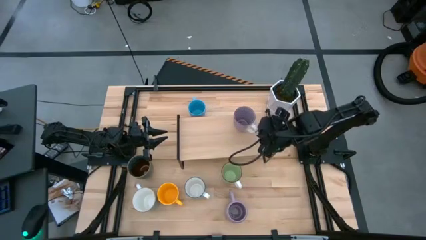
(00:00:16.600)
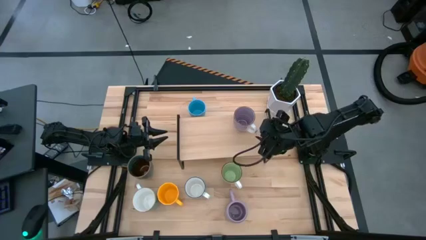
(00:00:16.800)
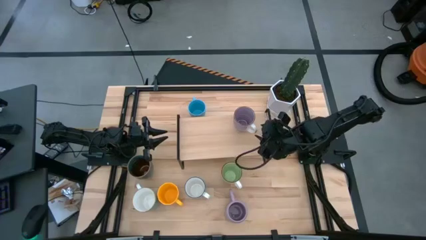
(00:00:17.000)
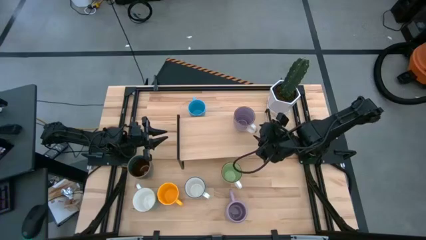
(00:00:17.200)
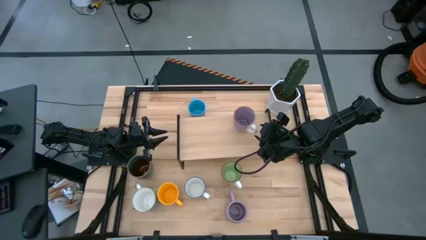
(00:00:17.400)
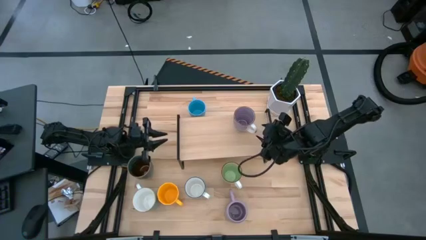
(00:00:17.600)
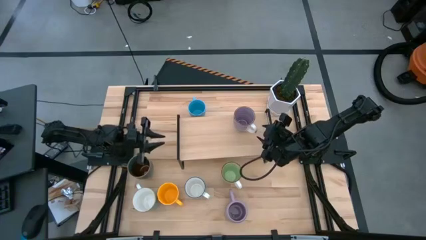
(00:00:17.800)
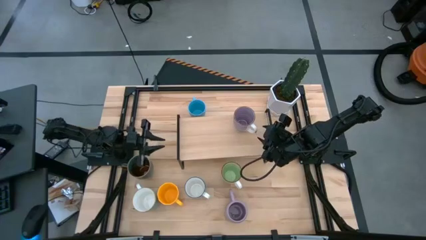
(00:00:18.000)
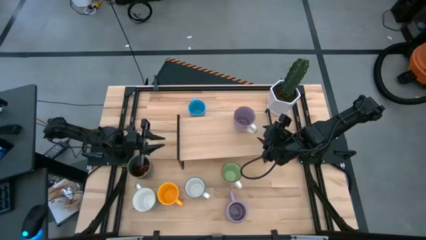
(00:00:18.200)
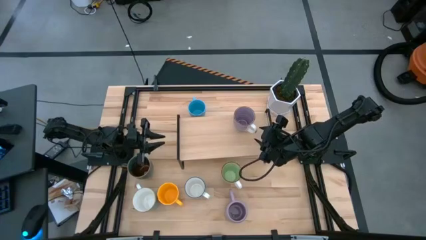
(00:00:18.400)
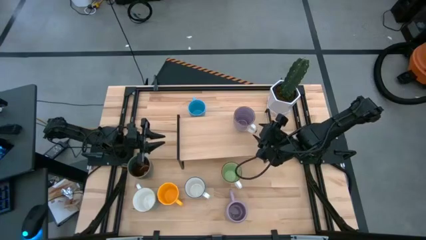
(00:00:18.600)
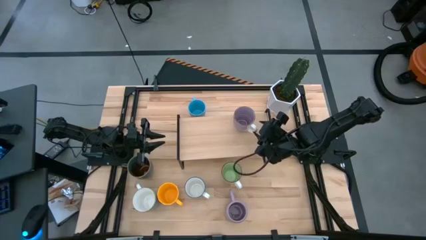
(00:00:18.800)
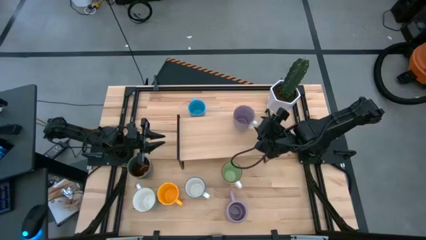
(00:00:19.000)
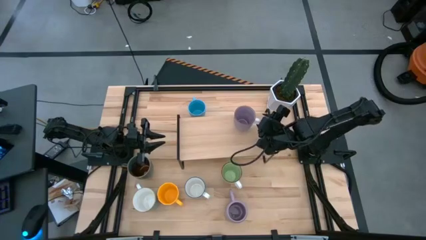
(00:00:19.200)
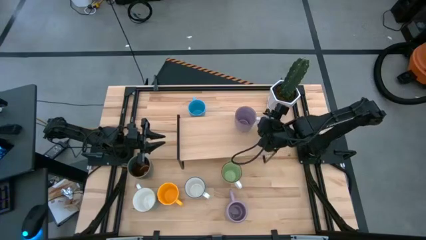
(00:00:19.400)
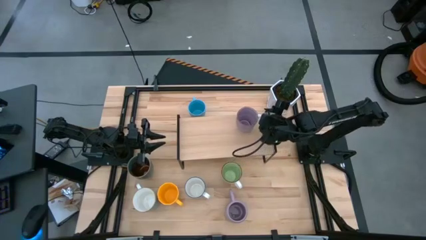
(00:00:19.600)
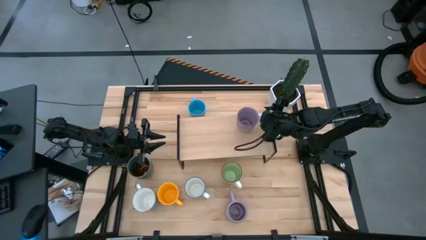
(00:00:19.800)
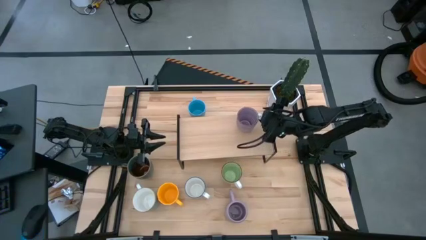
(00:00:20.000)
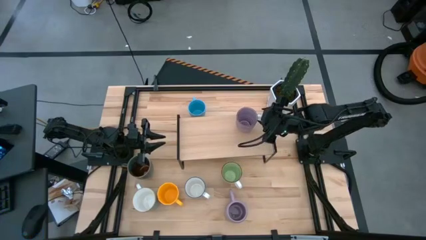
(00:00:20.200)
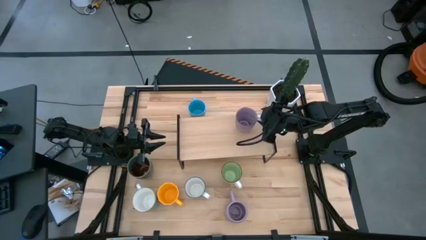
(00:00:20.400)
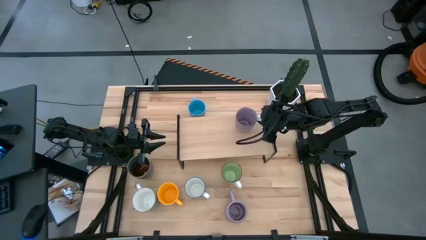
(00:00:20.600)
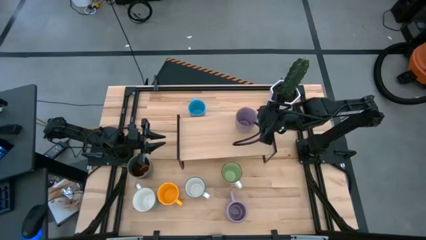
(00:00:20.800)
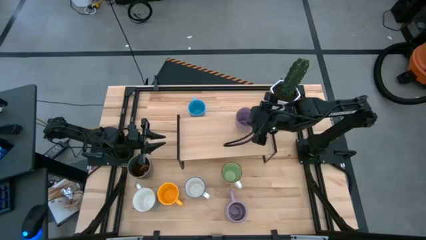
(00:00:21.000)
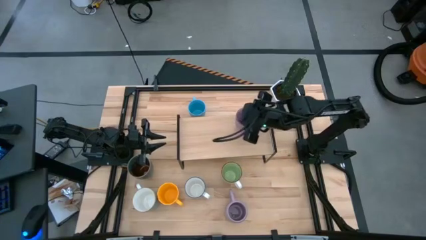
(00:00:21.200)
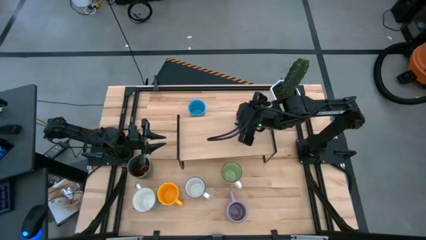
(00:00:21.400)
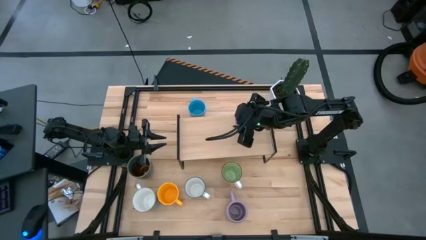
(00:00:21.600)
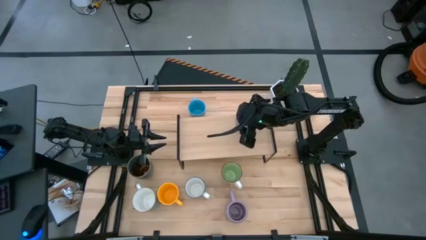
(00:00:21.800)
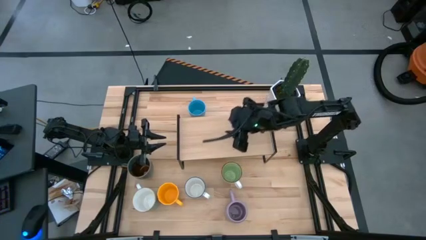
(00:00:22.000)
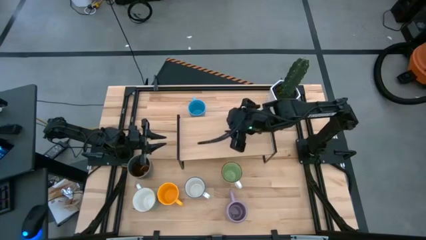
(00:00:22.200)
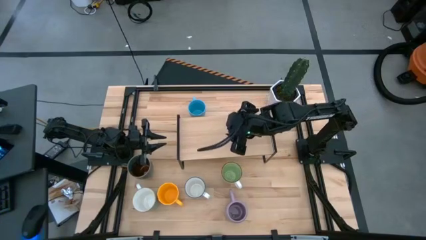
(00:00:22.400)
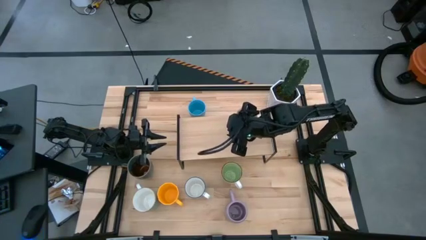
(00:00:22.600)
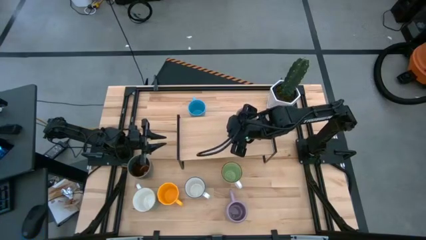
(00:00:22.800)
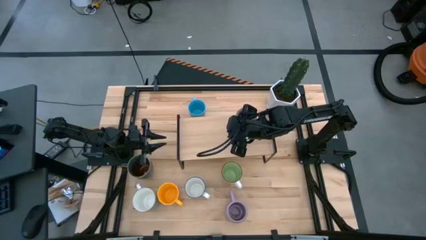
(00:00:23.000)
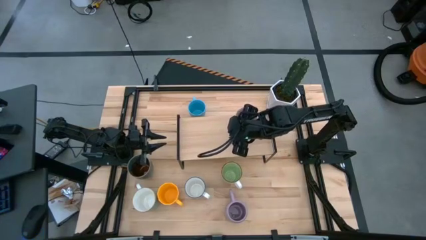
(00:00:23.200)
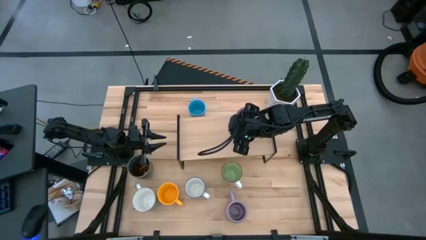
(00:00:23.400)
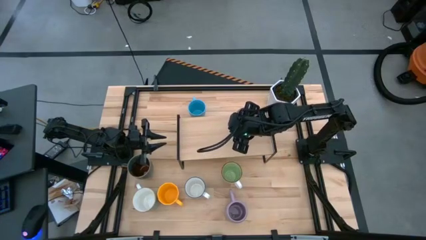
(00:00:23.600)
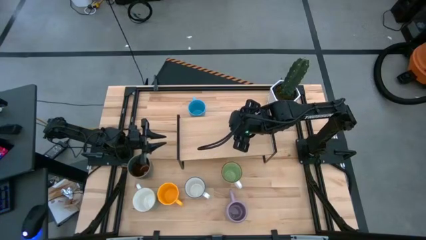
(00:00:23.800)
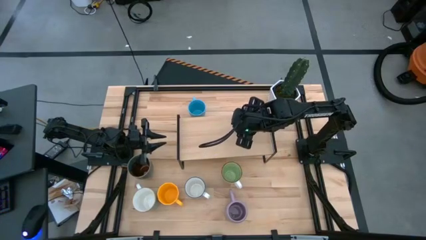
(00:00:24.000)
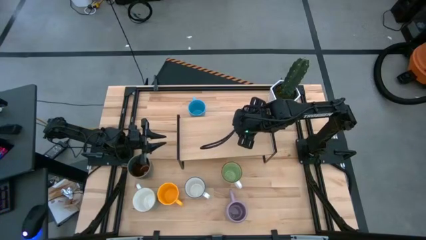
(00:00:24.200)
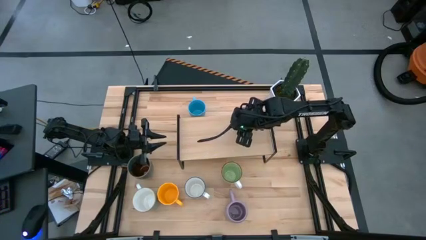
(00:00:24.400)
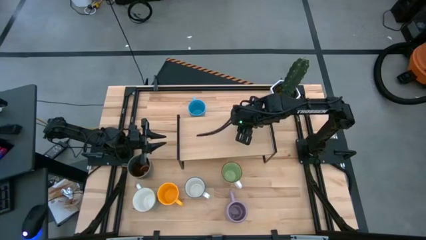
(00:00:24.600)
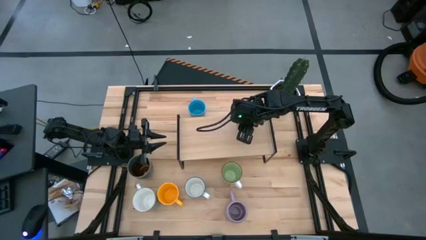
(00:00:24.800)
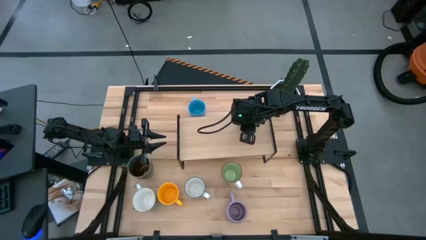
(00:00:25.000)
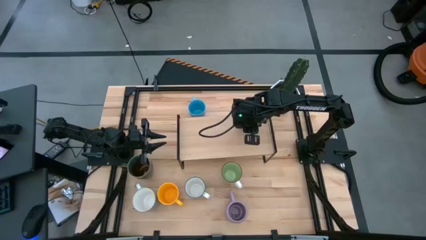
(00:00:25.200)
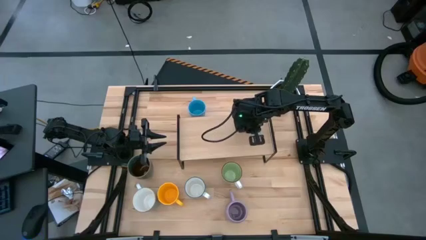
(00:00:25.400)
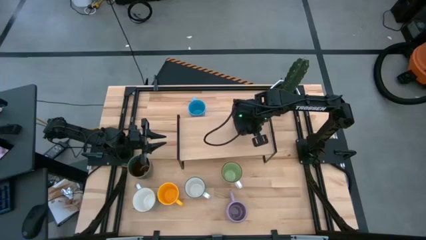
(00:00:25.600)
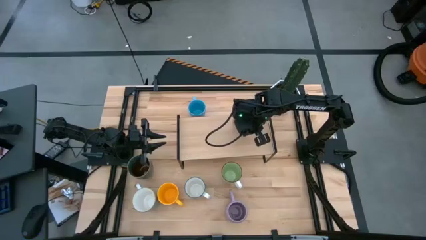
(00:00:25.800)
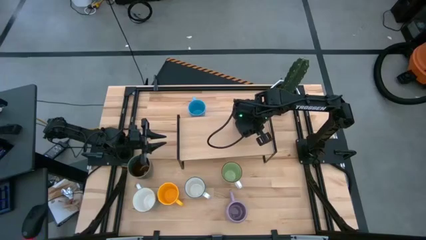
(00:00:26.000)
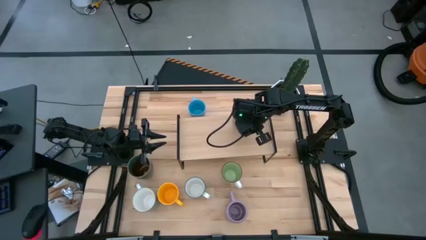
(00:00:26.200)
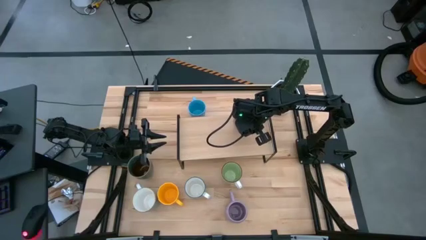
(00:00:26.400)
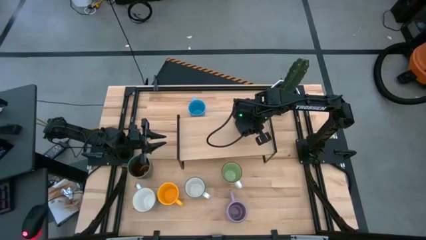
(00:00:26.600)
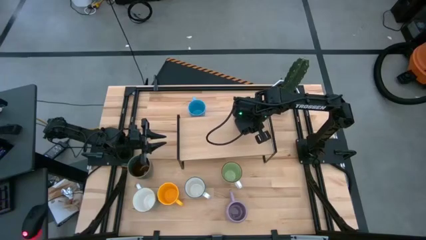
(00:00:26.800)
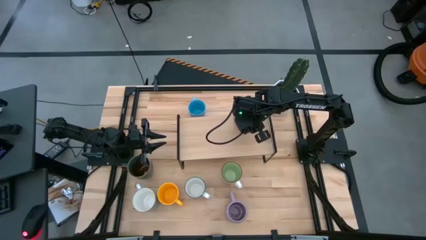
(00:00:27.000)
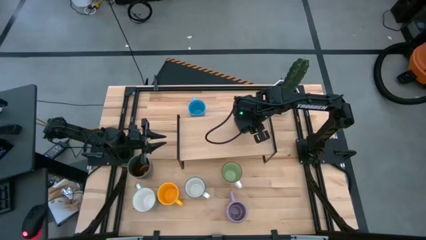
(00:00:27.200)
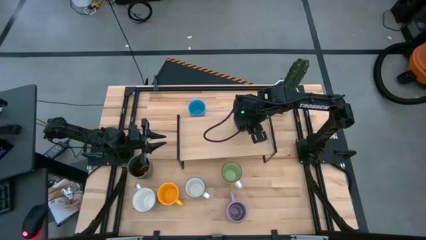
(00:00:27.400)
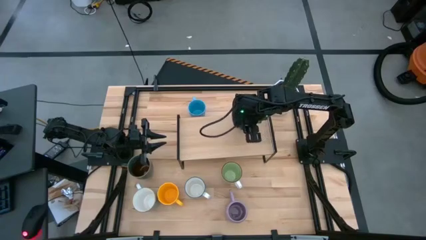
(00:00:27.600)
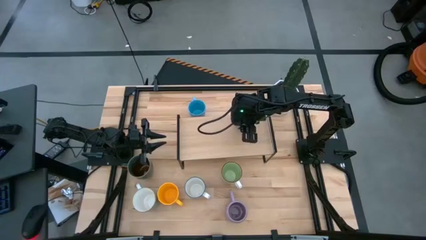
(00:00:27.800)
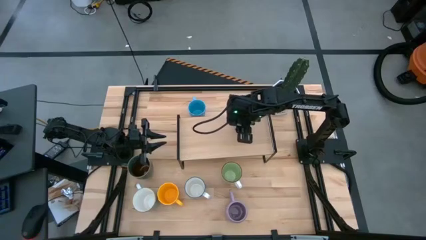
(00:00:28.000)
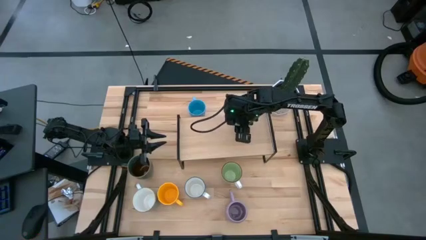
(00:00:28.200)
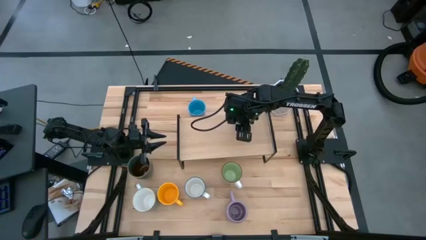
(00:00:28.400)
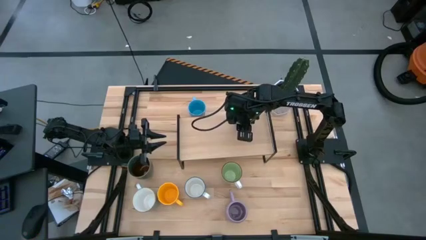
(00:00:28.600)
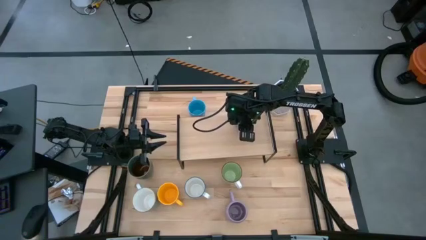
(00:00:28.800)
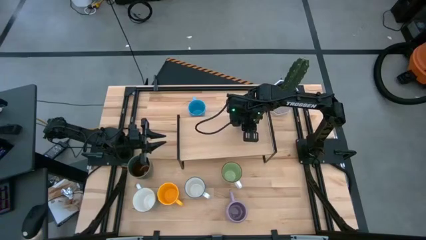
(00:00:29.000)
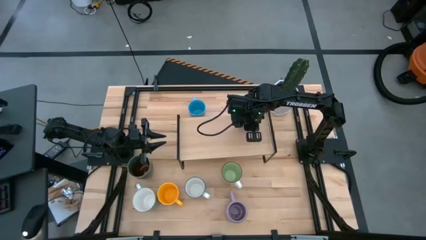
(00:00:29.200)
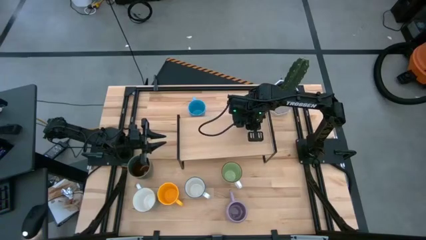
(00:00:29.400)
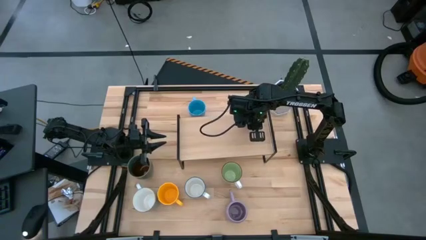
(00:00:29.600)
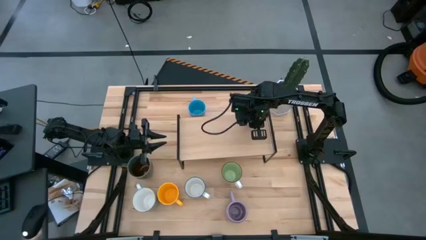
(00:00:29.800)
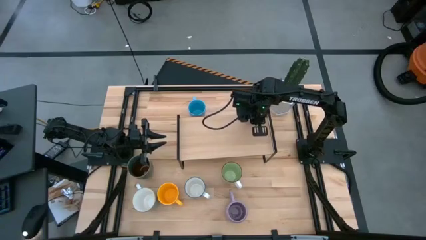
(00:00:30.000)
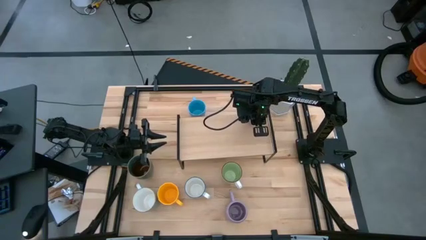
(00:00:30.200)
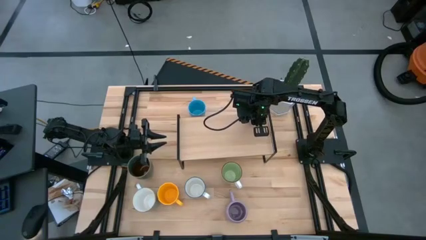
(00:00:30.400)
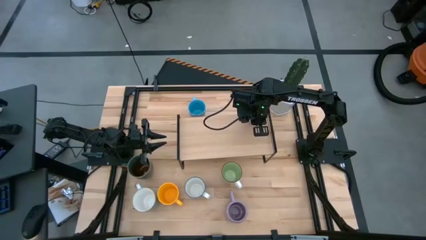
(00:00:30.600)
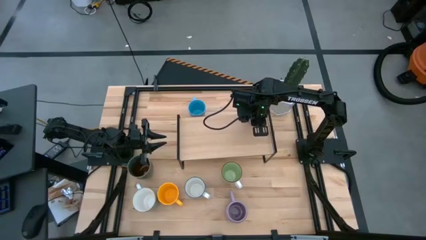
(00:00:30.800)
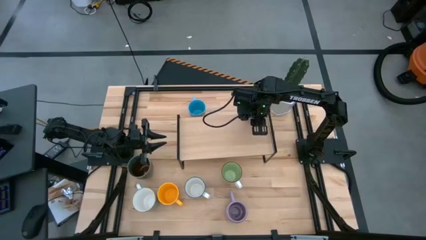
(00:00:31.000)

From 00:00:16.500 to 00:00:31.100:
Task: Place coffee mugs
Put the violet-white mug on the shelf
